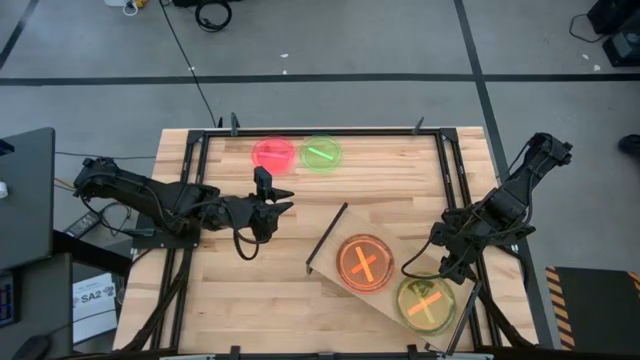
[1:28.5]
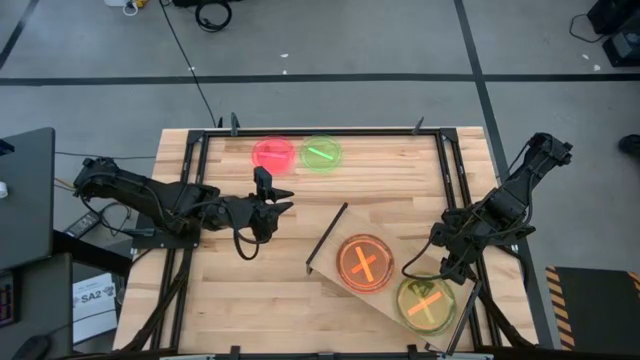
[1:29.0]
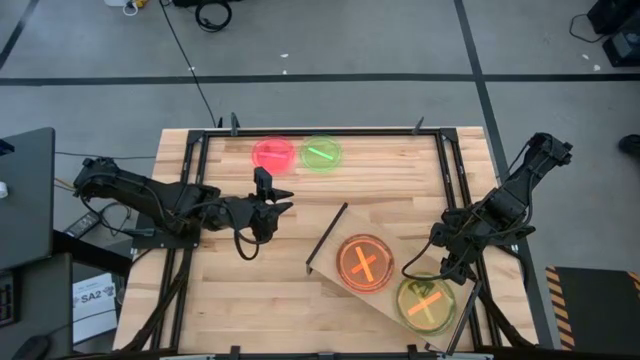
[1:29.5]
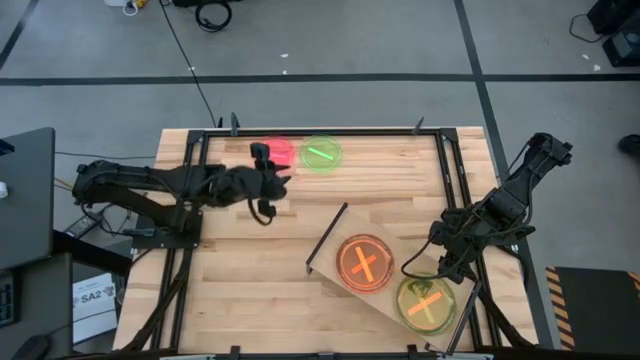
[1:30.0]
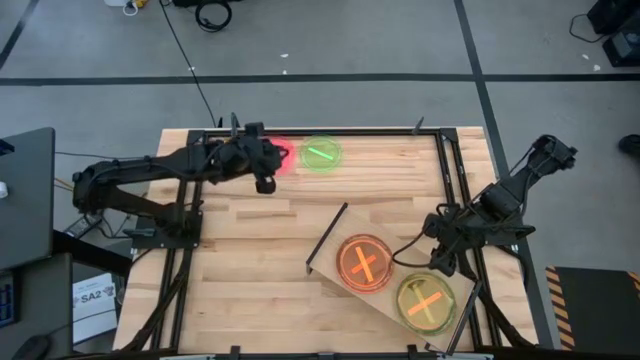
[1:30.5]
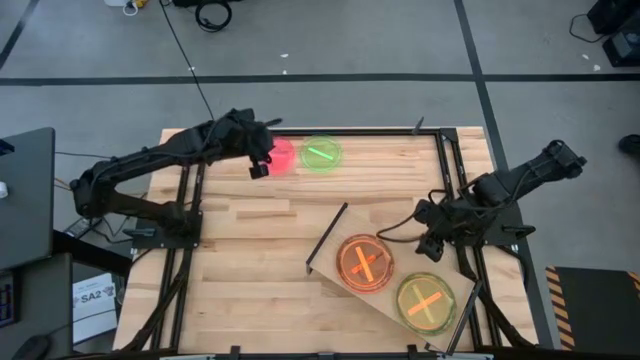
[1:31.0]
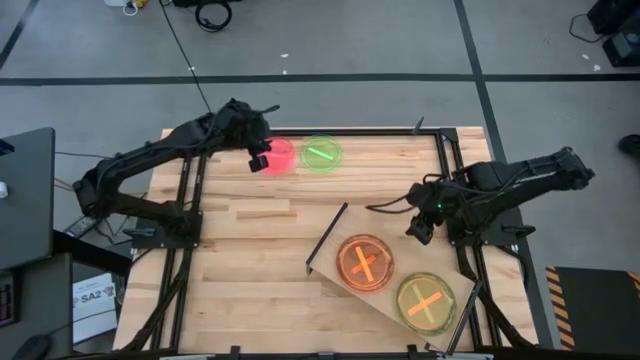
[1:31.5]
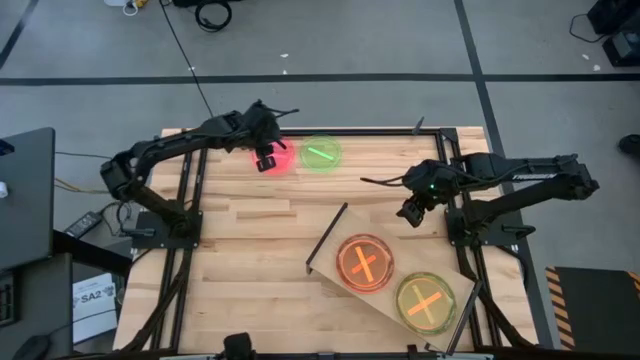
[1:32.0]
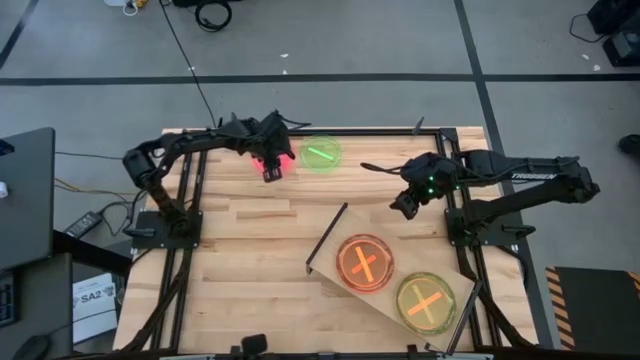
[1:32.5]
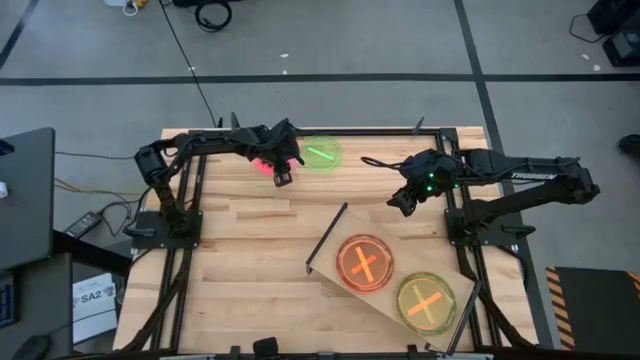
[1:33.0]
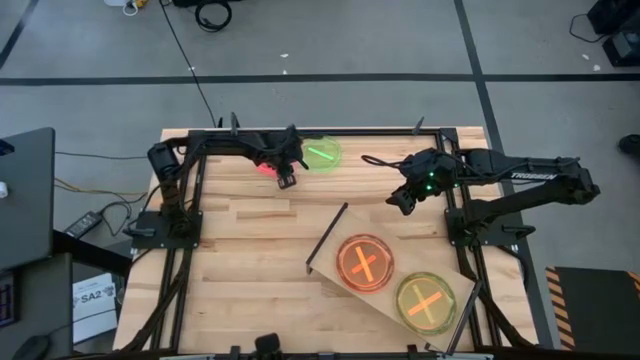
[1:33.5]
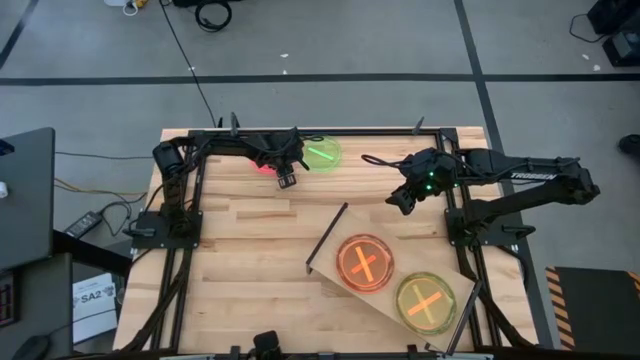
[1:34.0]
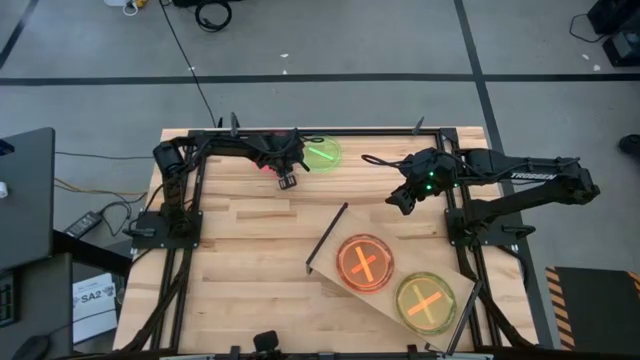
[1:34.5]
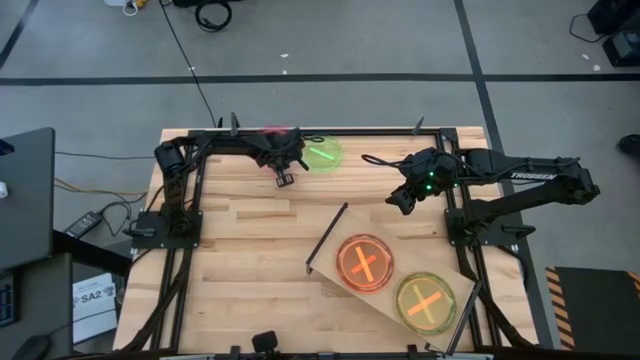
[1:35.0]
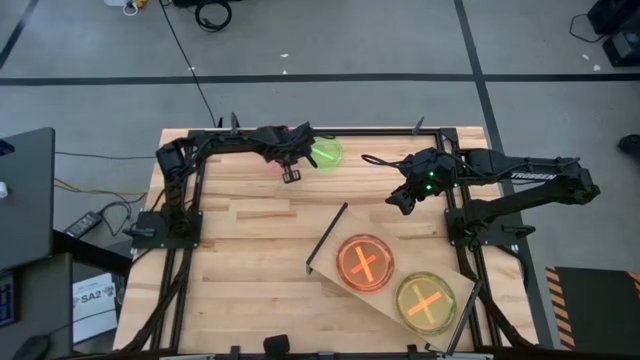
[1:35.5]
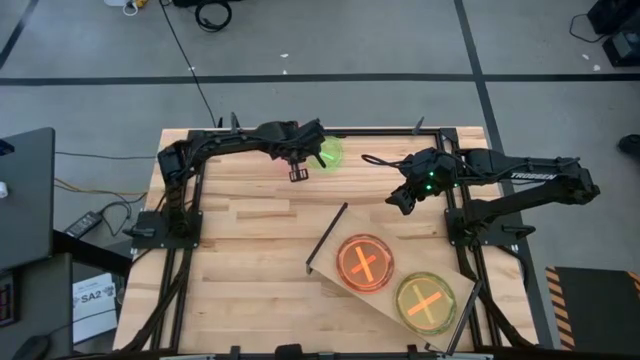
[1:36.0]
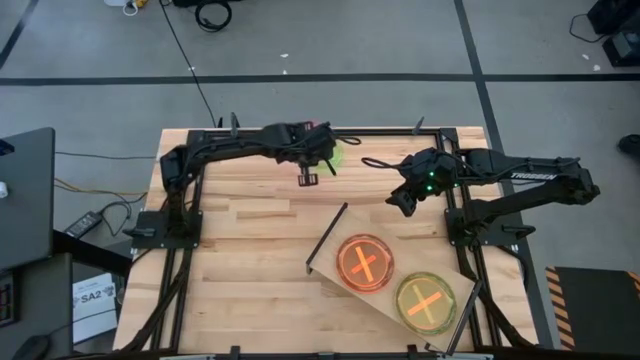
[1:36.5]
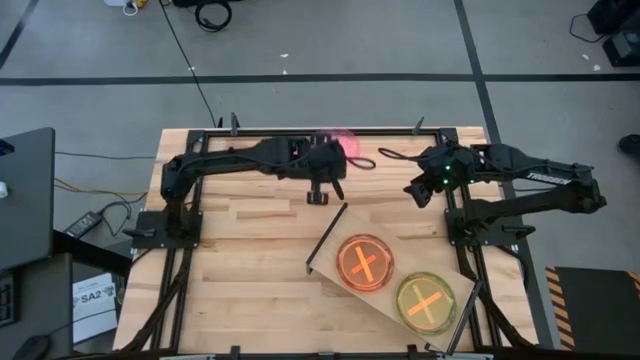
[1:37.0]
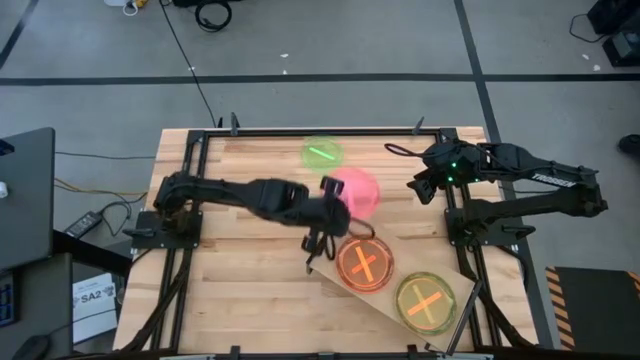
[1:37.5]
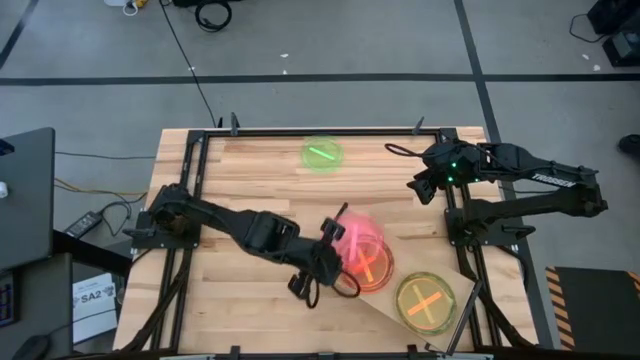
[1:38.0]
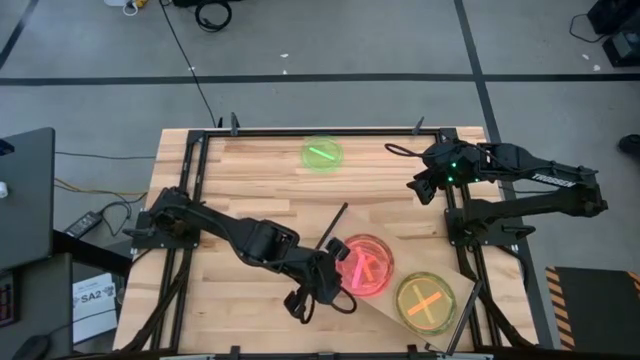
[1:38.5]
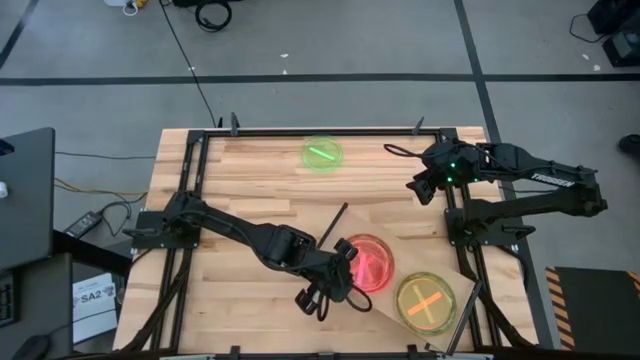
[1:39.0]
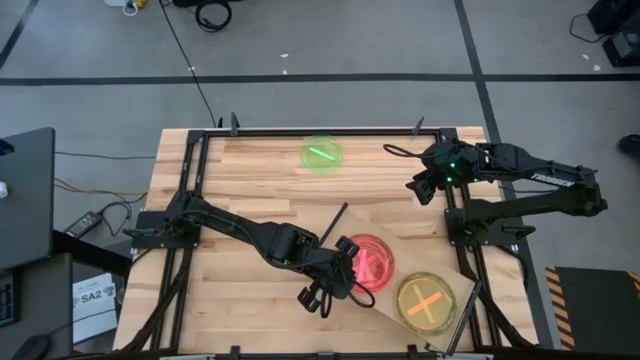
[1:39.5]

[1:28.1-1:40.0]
Task: Place and stack plates onto a shelf
Stack the transparent pink plate on the left transparent orange plate on the shelf

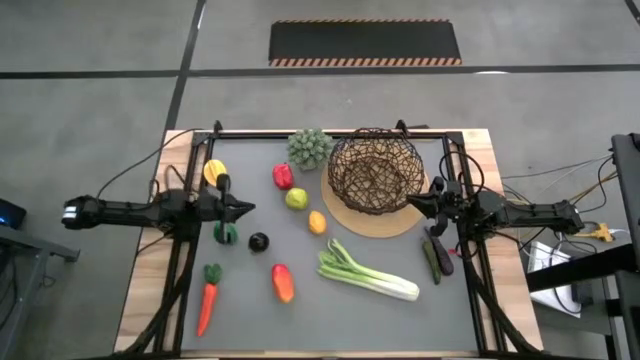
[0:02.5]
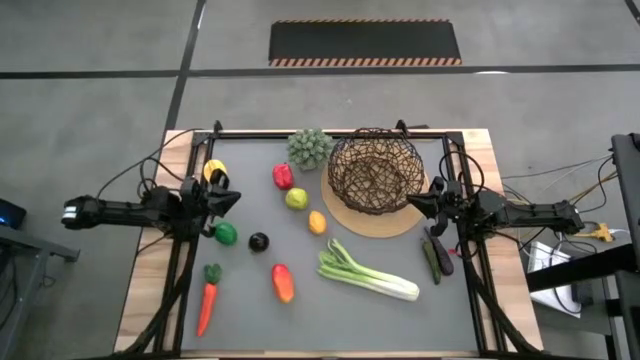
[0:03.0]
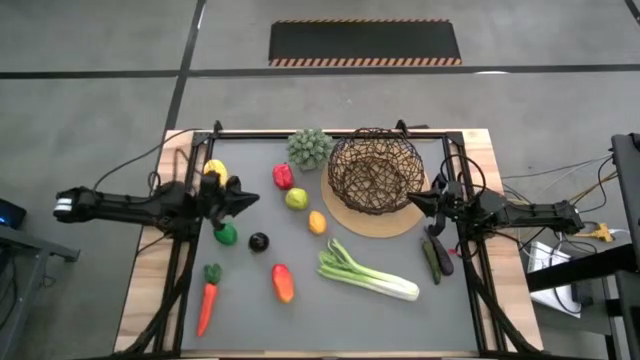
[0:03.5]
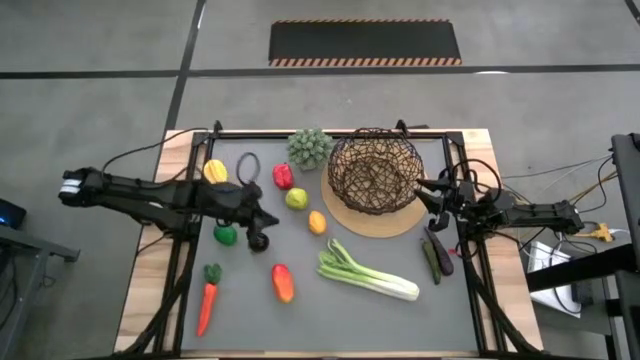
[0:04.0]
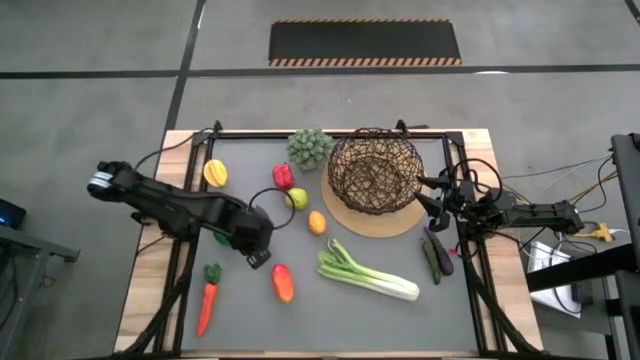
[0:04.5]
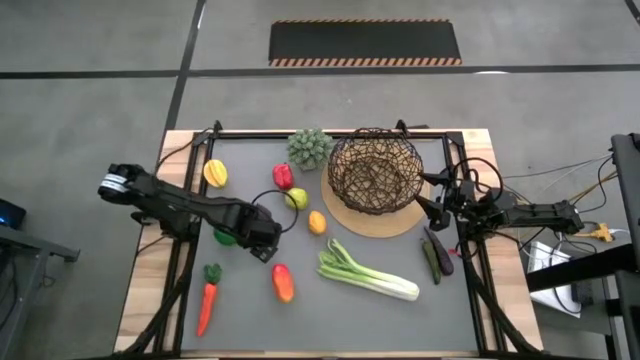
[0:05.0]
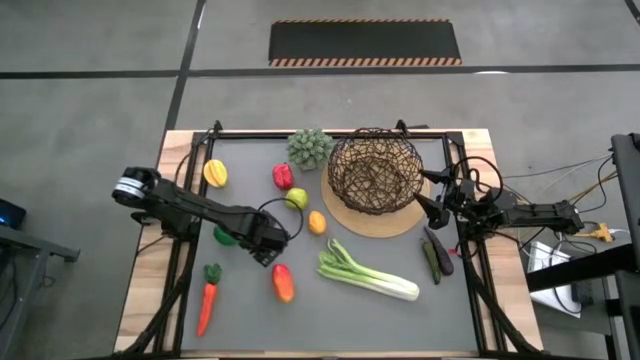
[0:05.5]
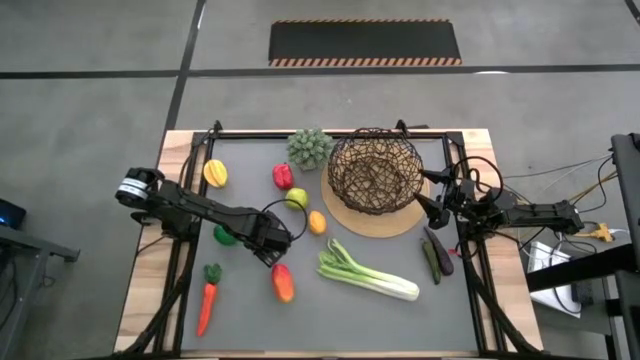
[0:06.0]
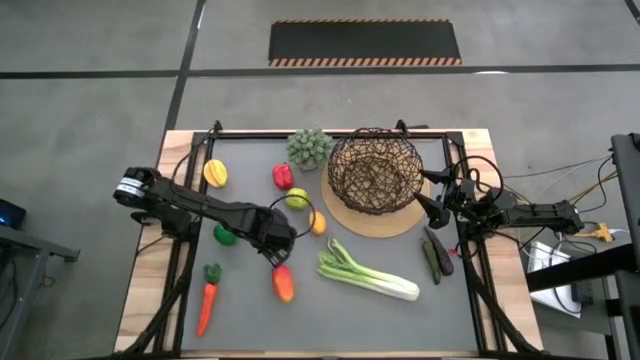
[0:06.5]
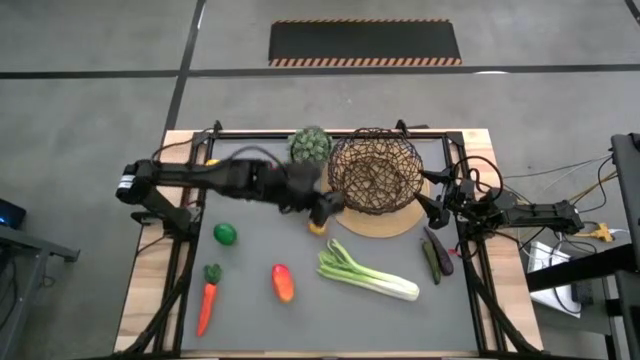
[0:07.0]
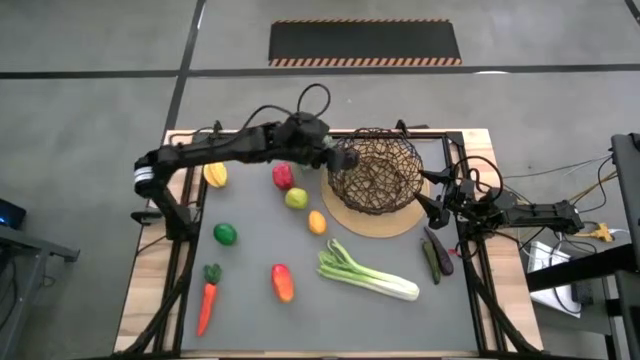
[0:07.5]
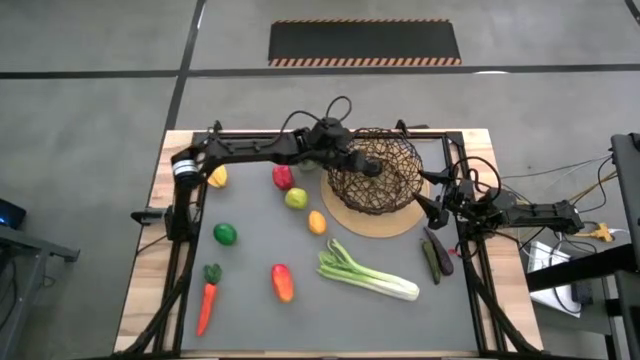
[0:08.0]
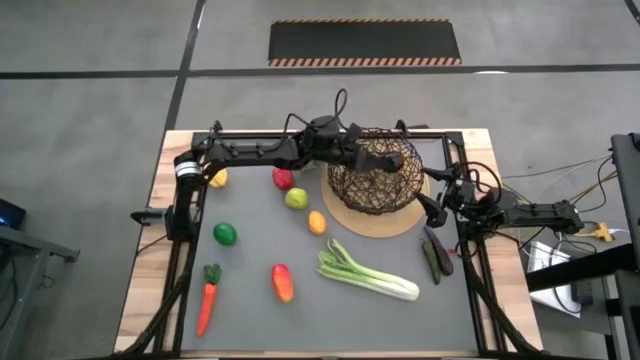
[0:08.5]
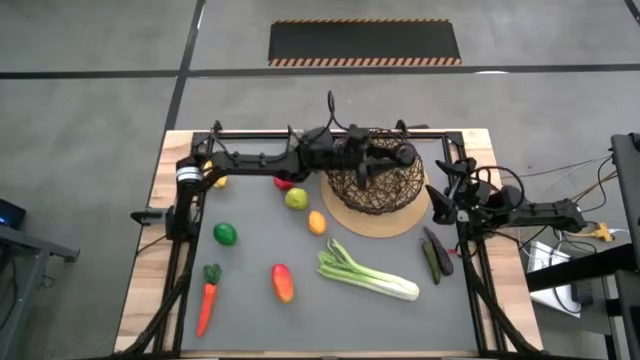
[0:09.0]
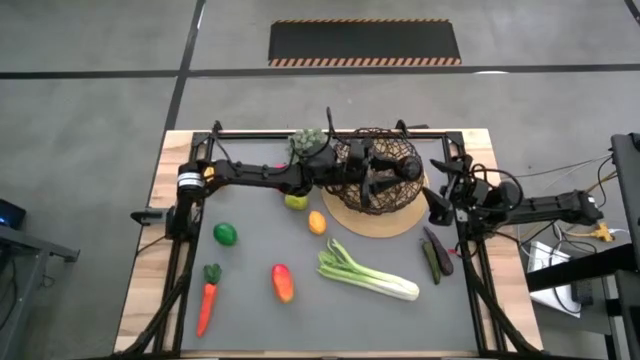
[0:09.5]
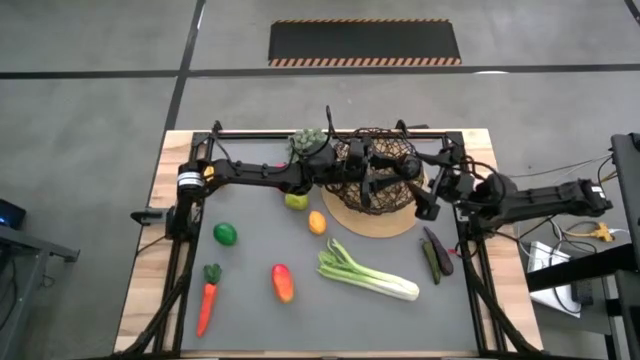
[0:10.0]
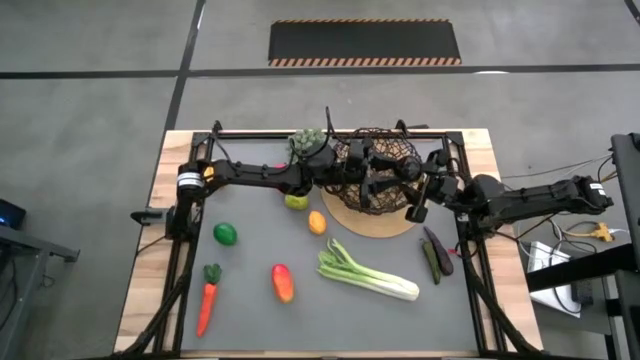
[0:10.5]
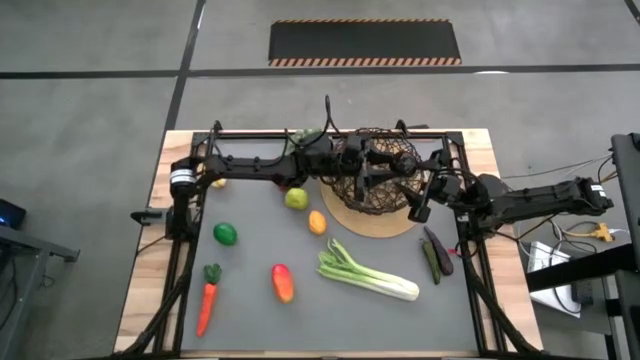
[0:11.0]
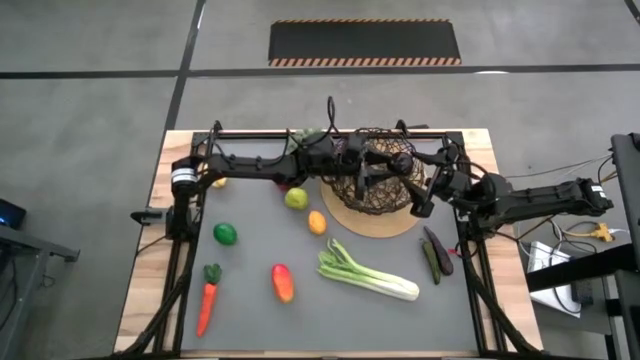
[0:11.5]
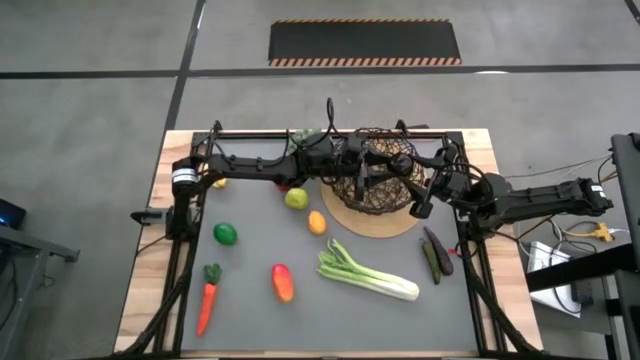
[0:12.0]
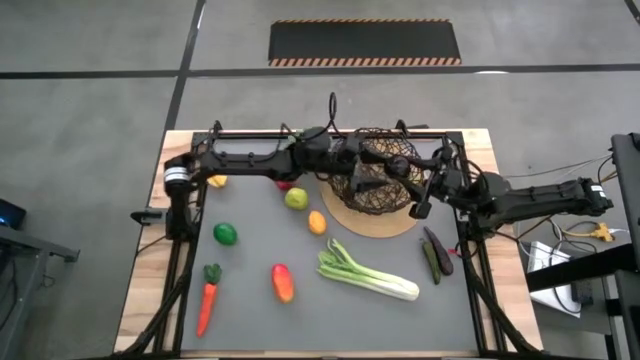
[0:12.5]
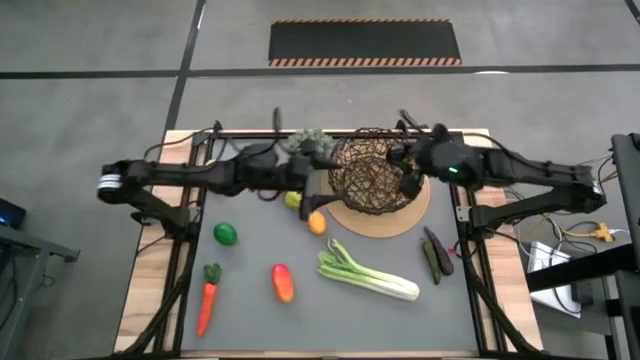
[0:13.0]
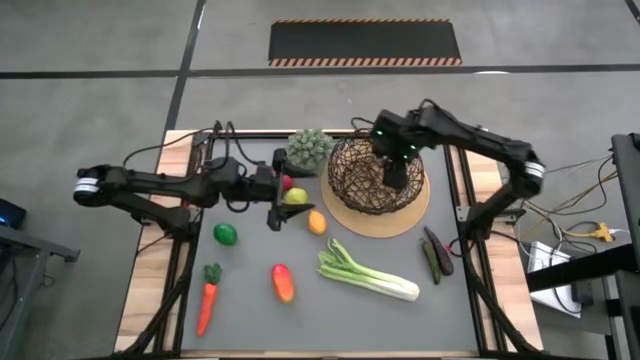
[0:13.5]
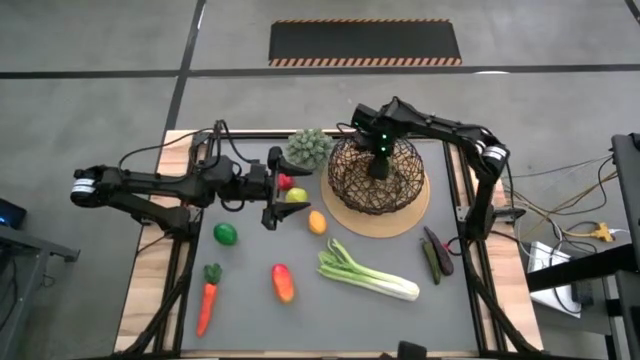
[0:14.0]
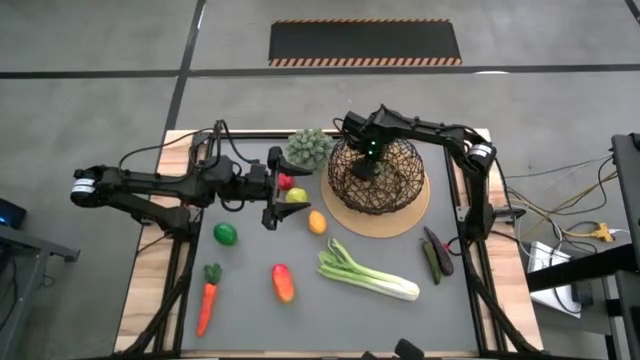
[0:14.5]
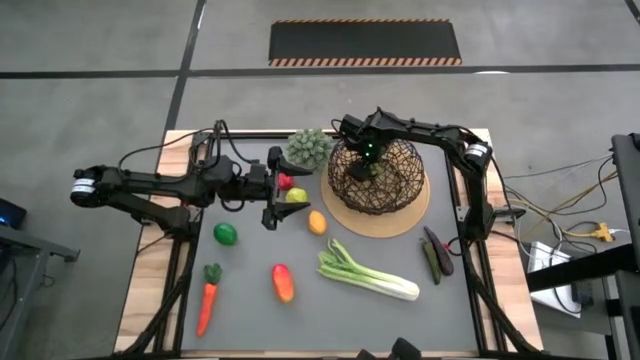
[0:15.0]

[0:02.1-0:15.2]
Task: Build produce basket
Put the black plum into the black wire basket
